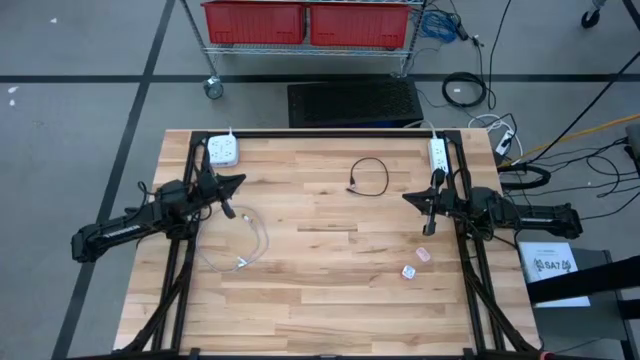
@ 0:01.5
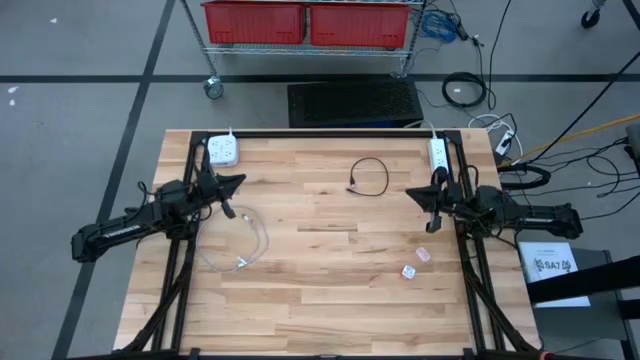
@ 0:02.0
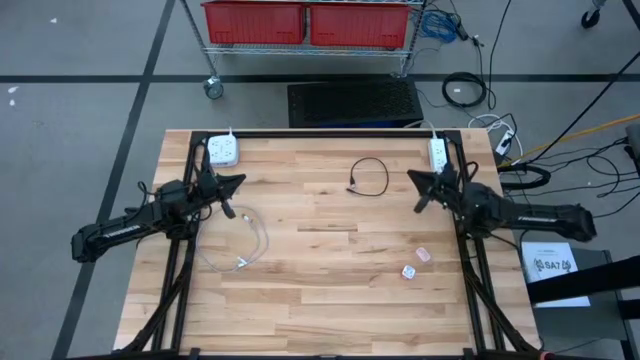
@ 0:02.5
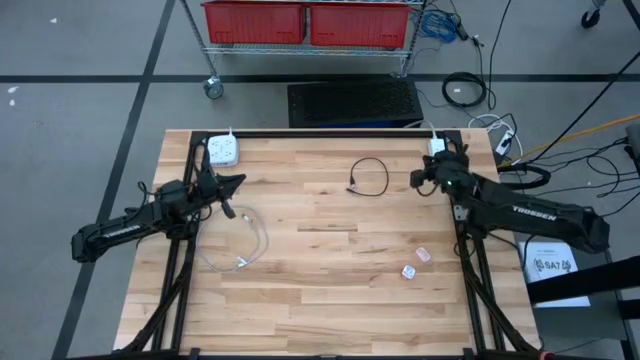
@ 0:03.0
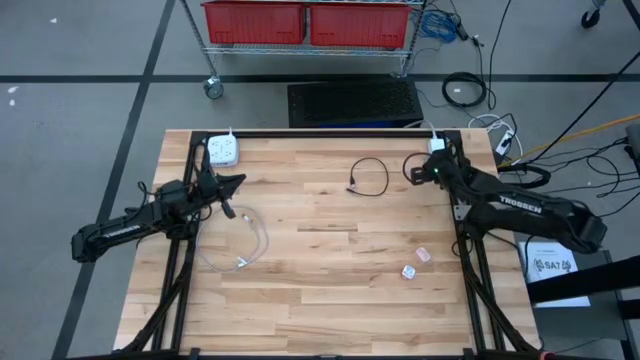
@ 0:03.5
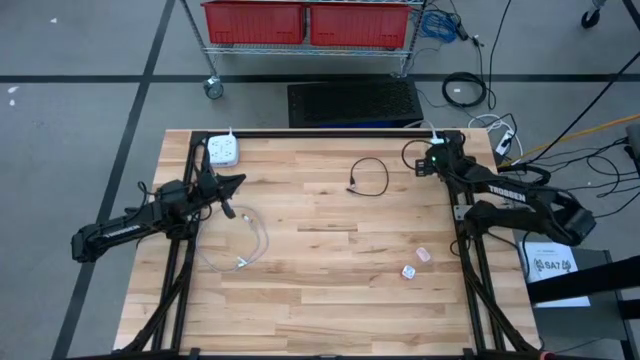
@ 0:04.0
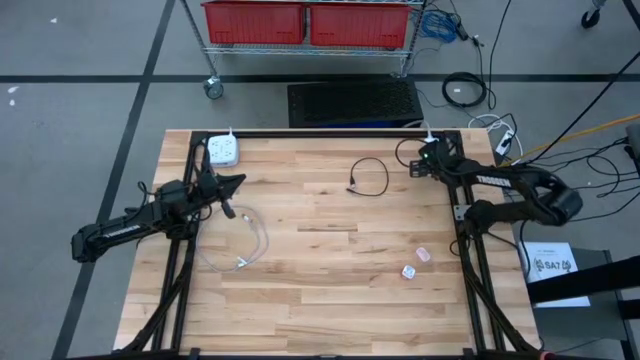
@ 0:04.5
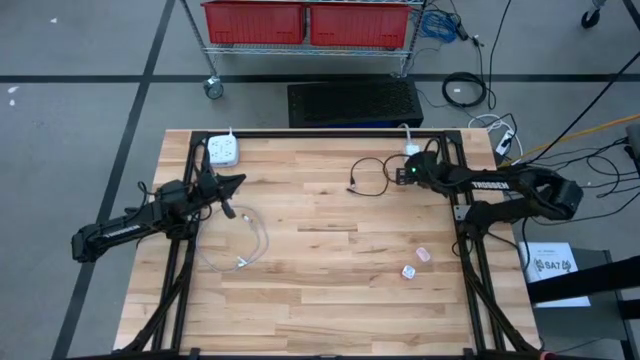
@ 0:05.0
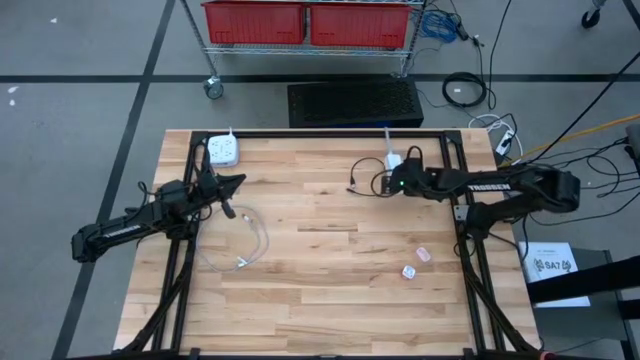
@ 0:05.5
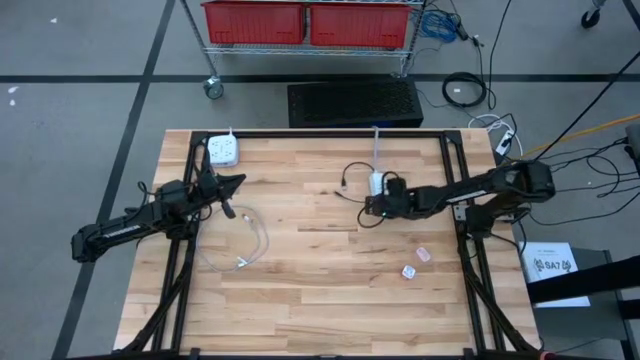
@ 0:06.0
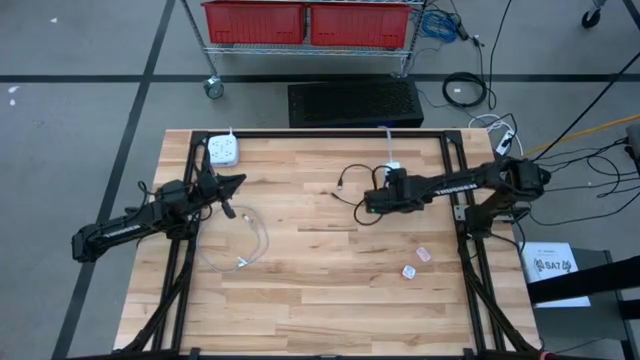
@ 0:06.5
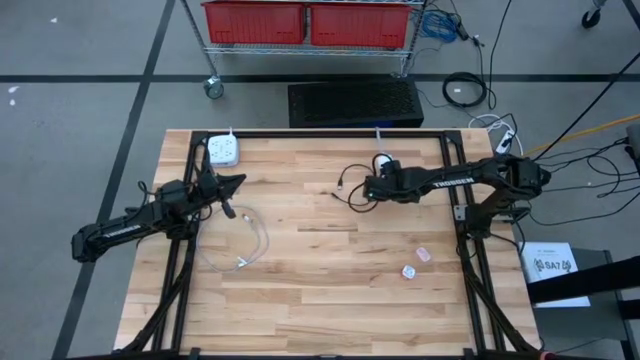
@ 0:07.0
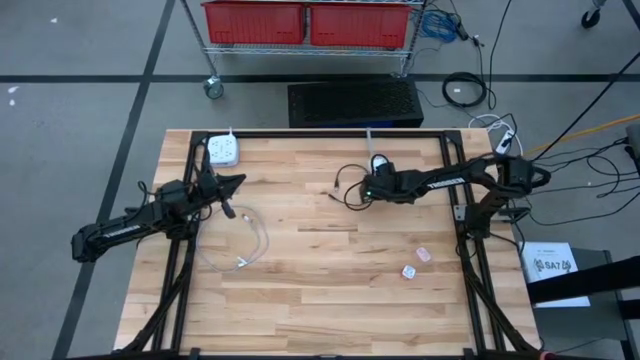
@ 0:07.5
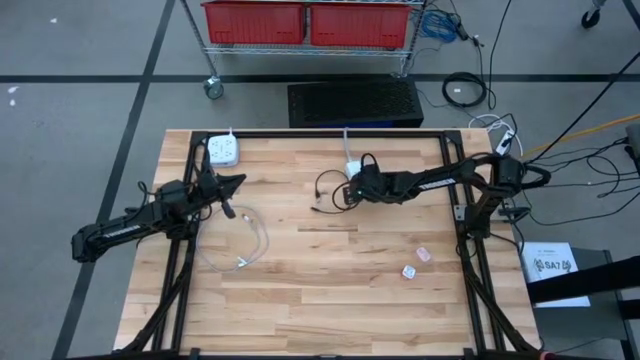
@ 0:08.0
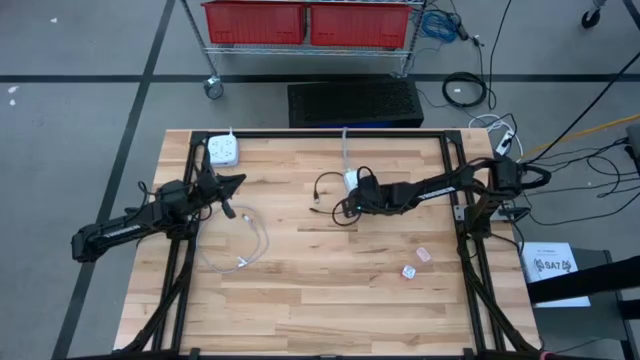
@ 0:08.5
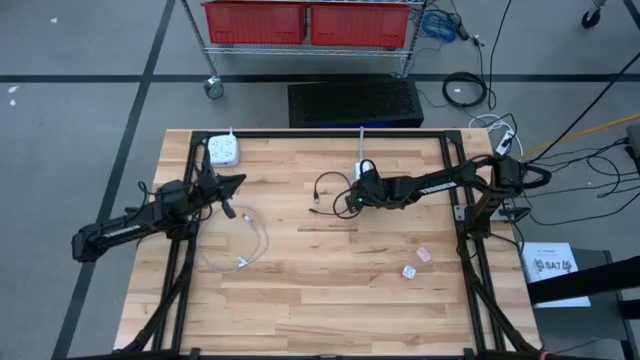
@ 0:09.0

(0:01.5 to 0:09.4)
Task: Insert USB
Move the right white outlet extension to the center
